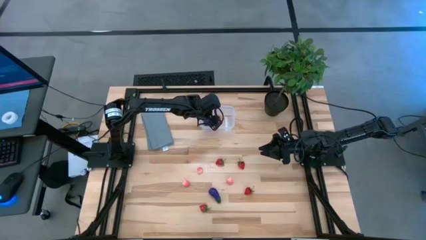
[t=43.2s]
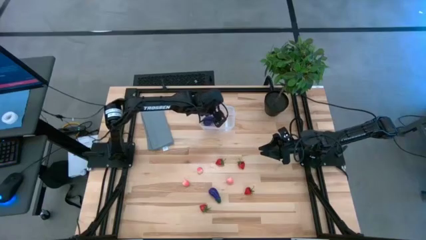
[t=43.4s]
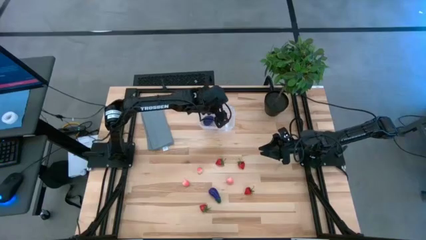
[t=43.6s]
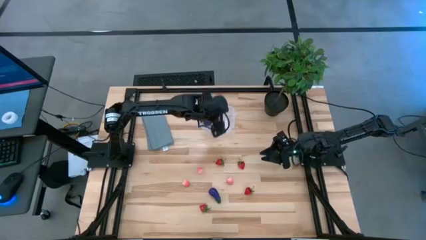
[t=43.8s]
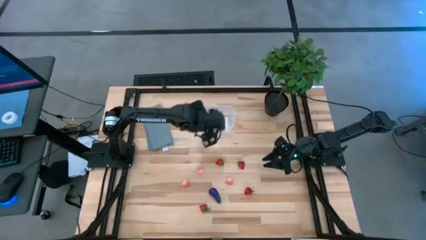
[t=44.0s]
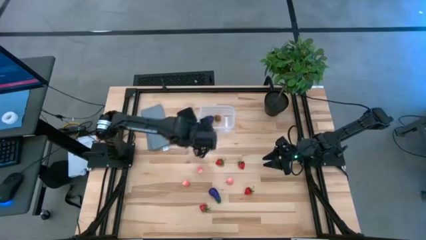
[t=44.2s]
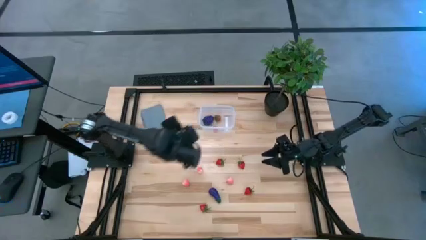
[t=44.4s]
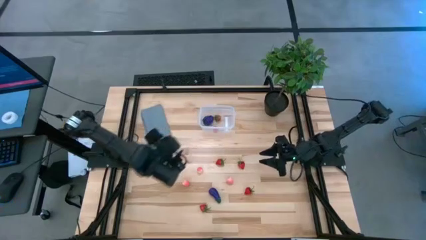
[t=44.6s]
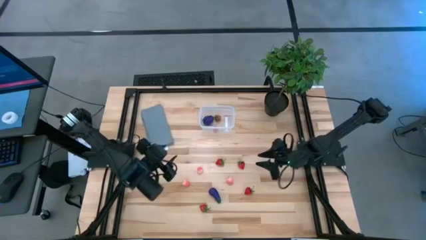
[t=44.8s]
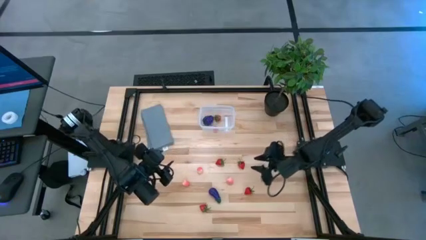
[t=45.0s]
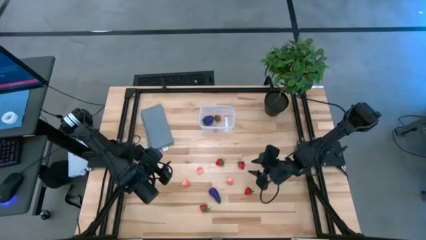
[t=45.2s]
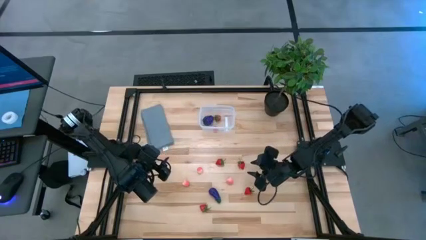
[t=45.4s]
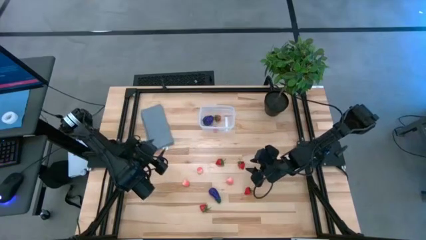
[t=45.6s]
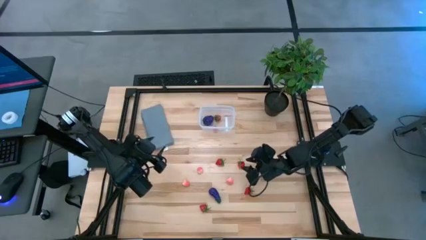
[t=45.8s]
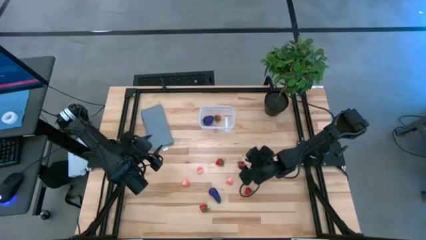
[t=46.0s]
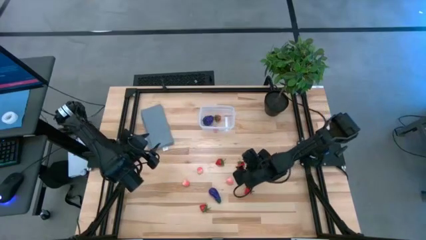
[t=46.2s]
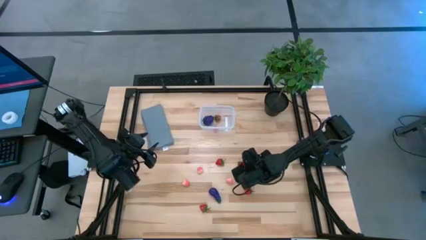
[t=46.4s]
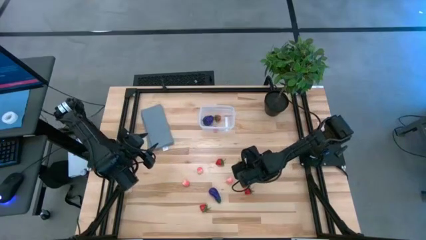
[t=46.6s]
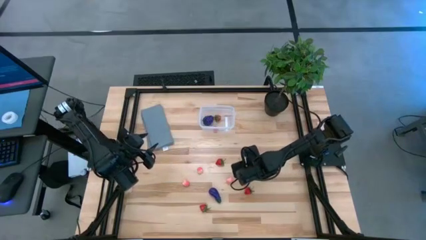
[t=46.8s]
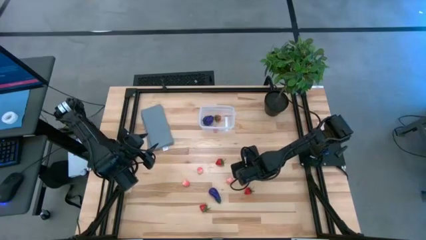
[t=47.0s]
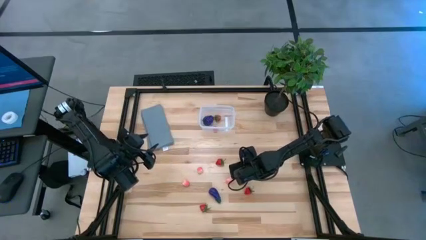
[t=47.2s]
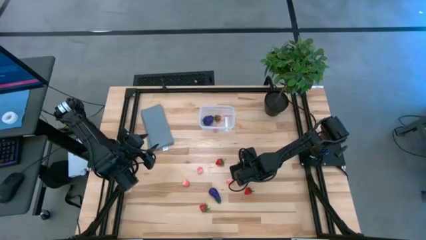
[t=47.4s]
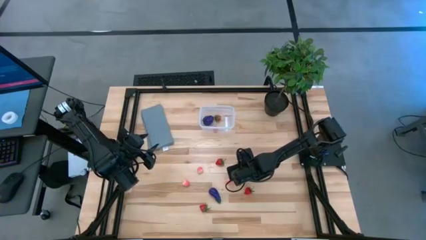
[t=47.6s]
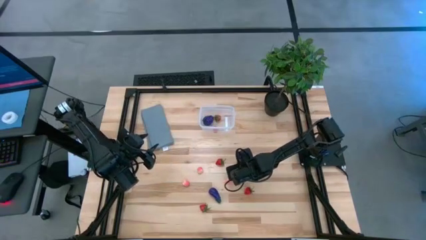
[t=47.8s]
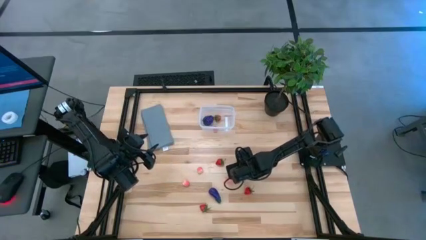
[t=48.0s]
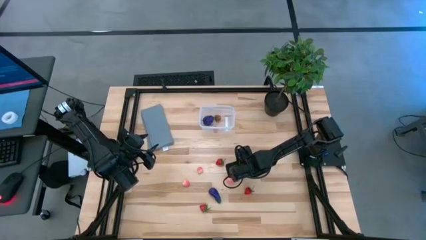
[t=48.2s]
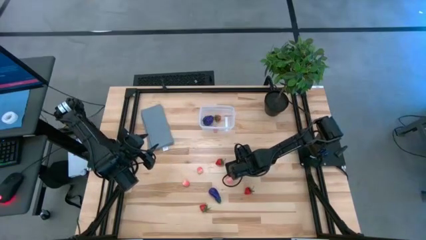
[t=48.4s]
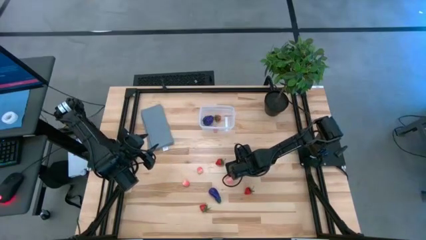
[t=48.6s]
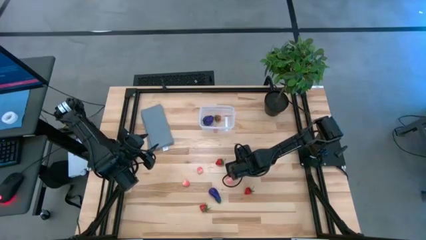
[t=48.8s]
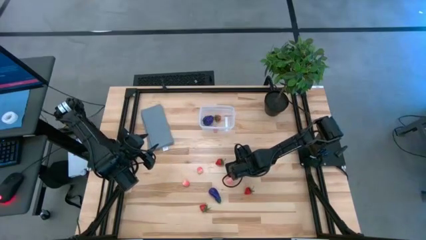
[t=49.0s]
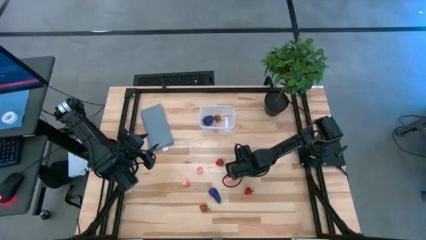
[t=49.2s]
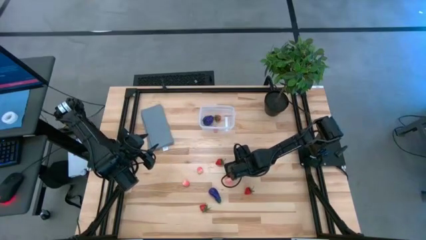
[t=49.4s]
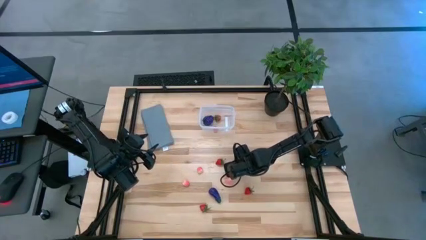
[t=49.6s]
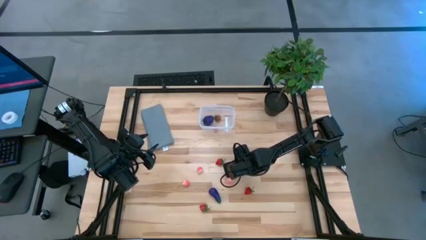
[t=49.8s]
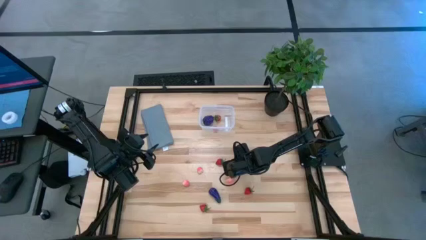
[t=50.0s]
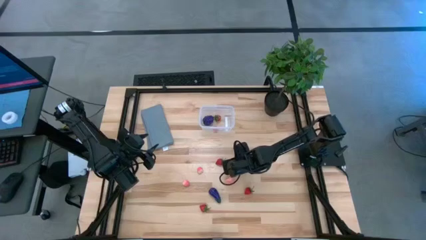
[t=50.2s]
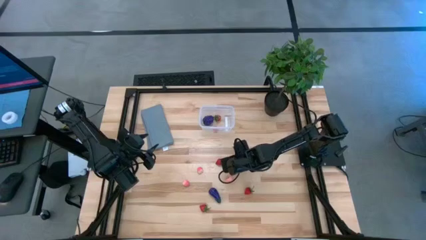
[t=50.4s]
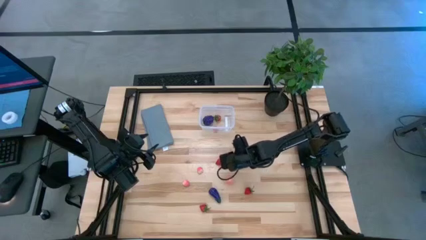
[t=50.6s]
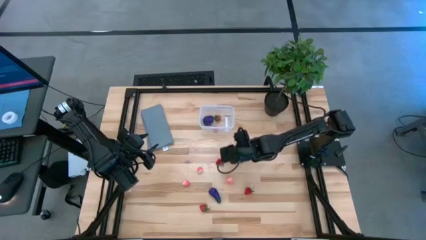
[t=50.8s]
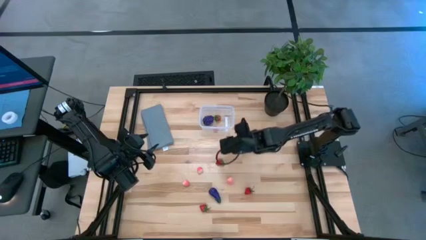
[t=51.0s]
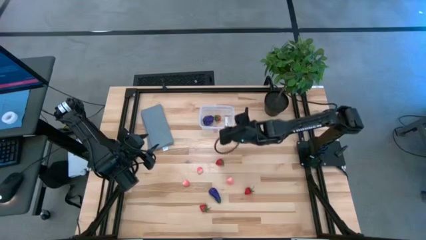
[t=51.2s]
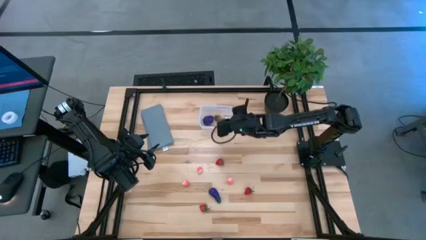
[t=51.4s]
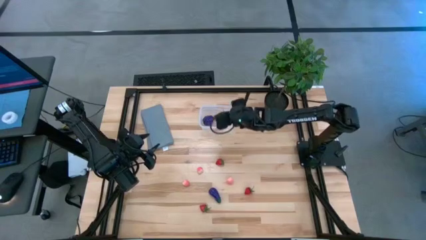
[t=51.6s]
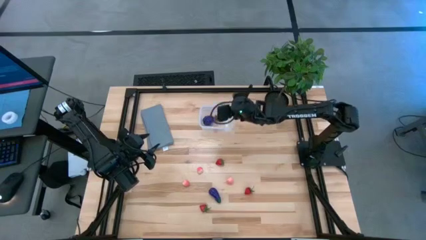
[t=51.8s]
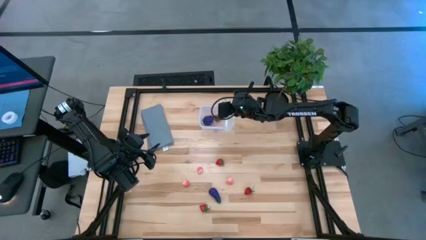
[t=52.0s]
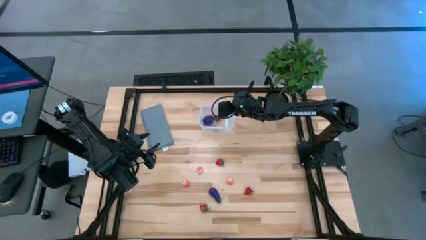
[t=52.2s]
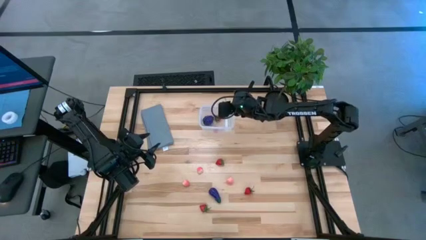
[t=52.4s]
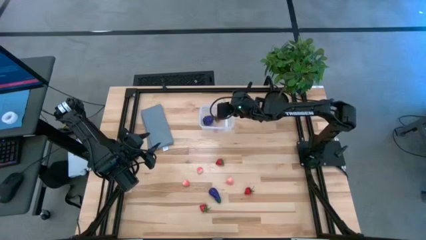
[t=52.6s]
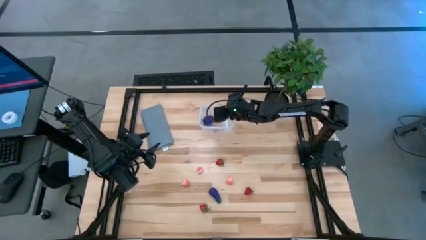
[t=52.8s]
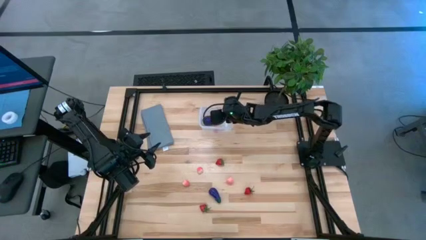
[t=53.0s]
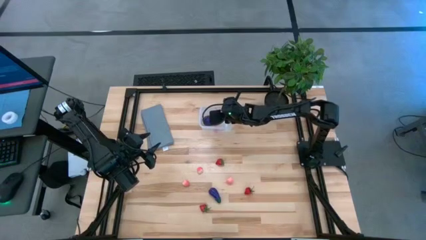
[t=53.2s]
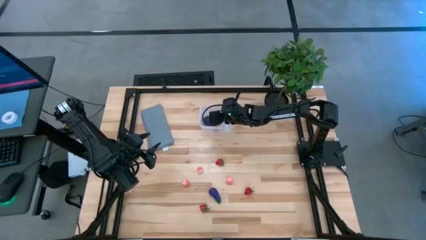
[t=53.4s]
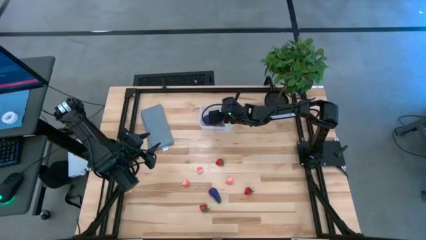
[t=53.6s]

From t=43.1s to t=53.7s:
Task: Pick and placing Produce into tupperware
Put the strawberry into the transparent bin

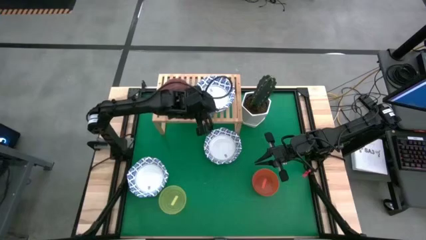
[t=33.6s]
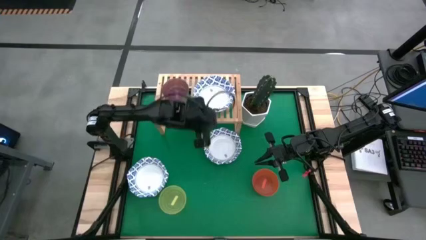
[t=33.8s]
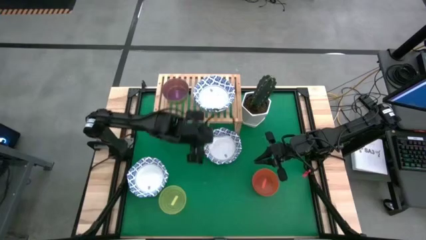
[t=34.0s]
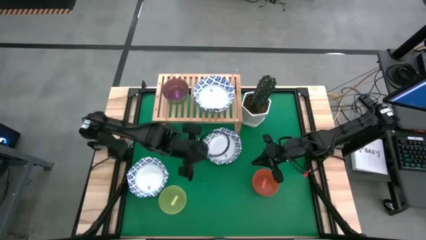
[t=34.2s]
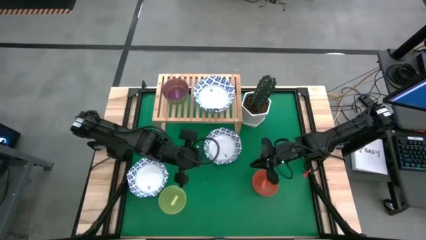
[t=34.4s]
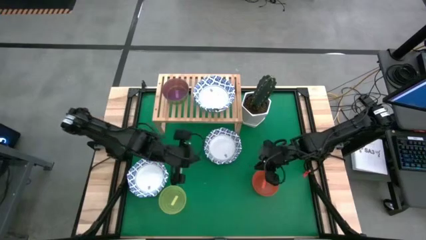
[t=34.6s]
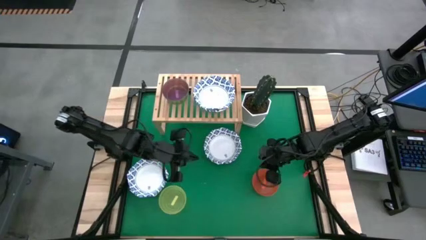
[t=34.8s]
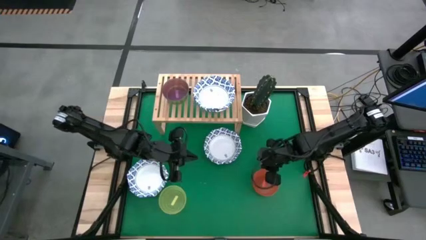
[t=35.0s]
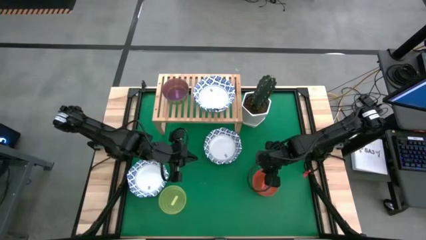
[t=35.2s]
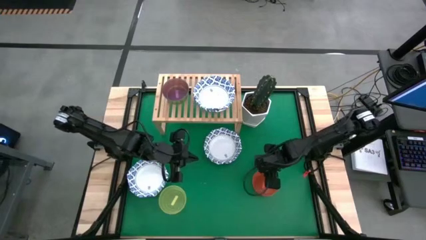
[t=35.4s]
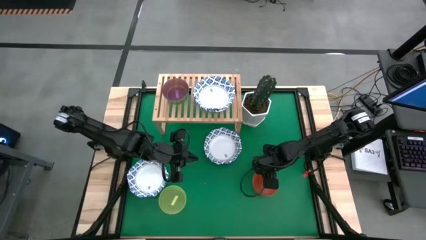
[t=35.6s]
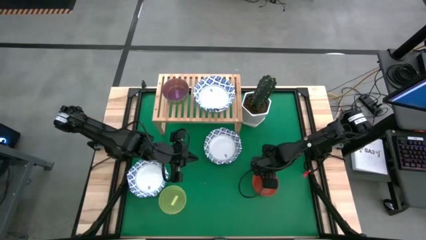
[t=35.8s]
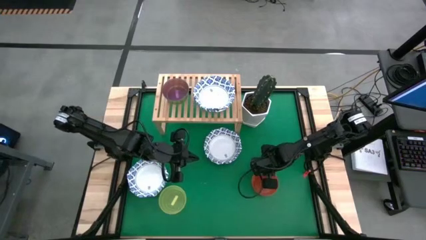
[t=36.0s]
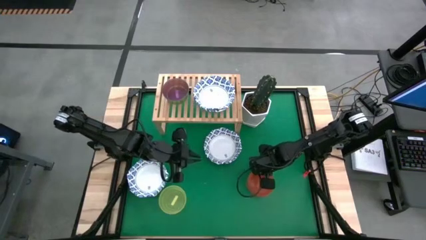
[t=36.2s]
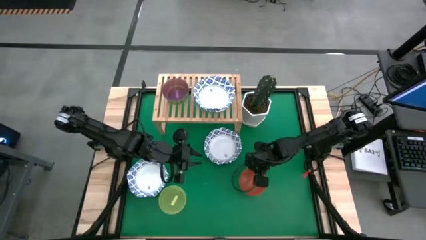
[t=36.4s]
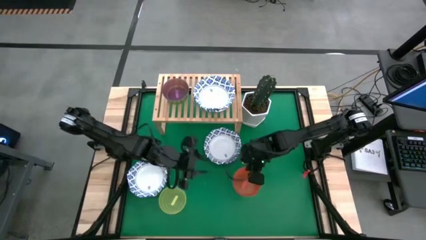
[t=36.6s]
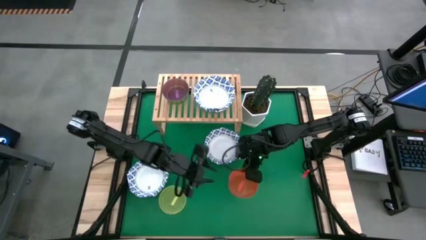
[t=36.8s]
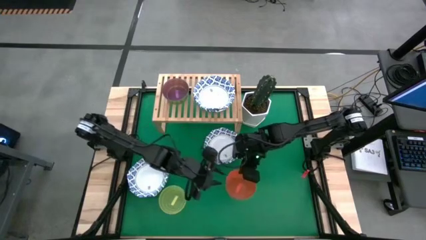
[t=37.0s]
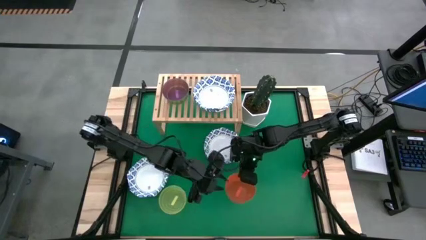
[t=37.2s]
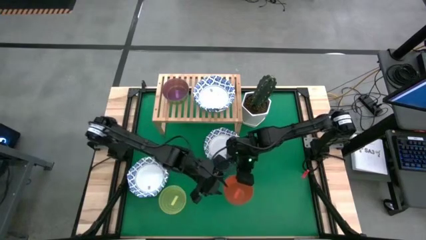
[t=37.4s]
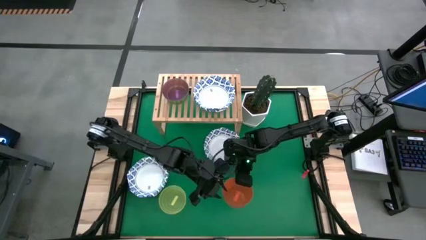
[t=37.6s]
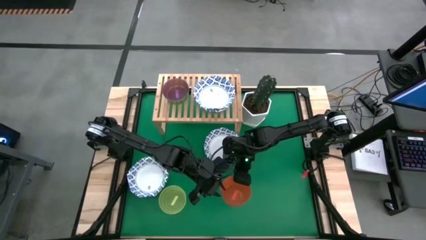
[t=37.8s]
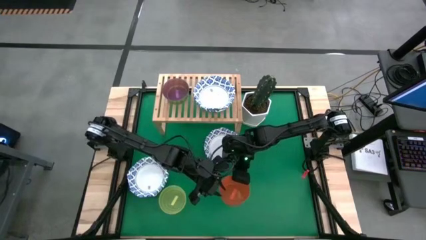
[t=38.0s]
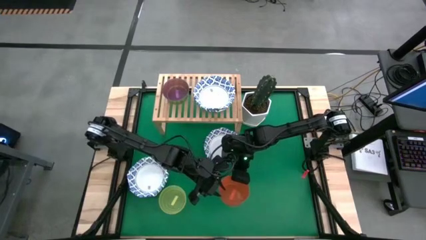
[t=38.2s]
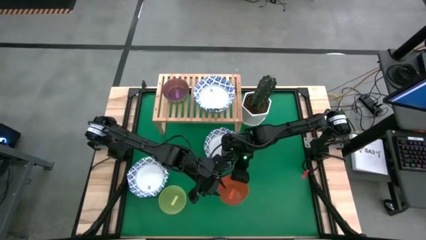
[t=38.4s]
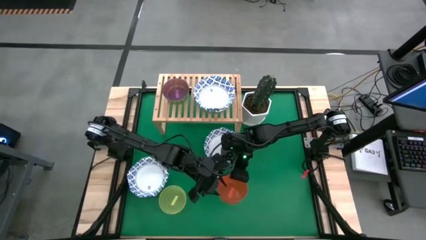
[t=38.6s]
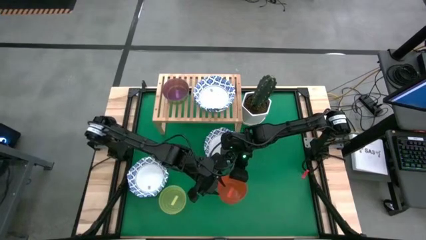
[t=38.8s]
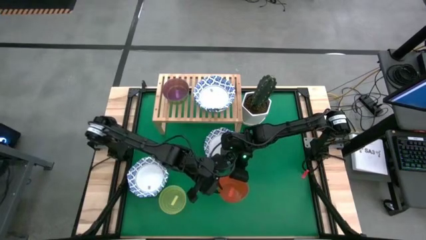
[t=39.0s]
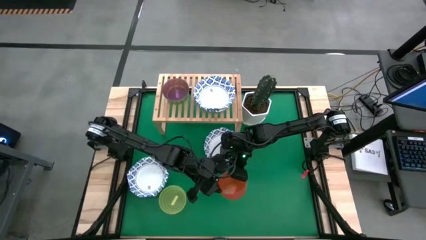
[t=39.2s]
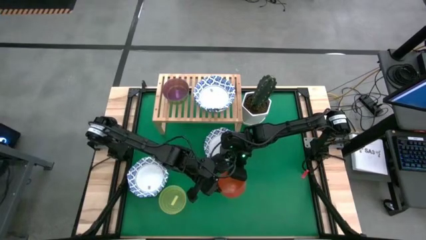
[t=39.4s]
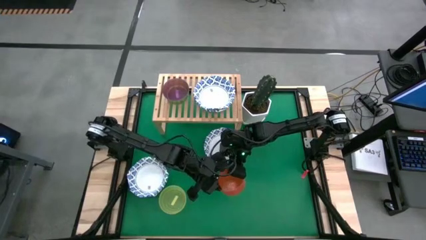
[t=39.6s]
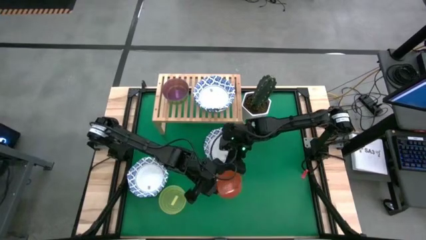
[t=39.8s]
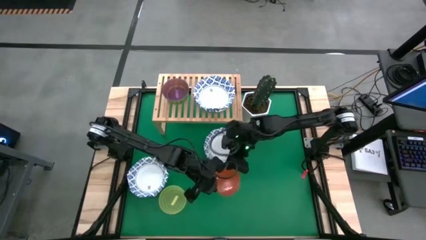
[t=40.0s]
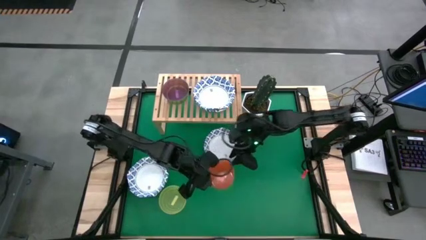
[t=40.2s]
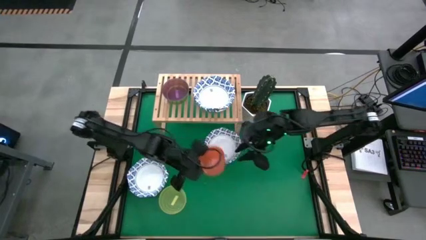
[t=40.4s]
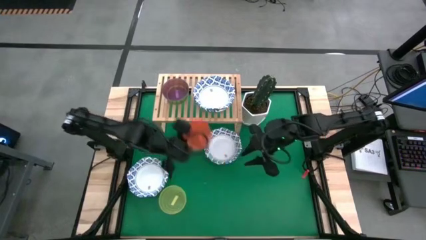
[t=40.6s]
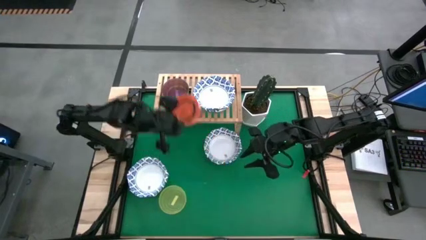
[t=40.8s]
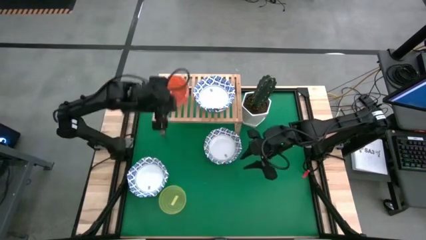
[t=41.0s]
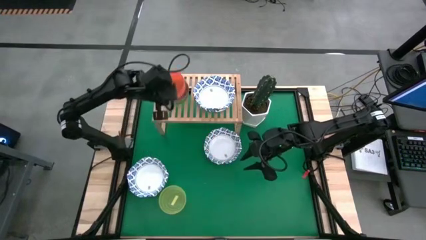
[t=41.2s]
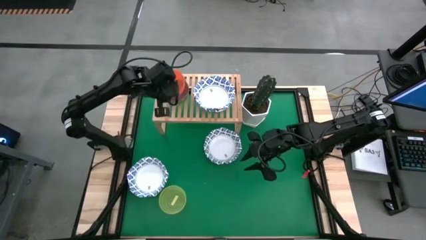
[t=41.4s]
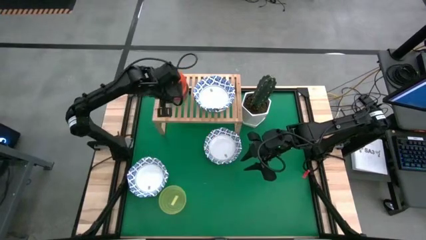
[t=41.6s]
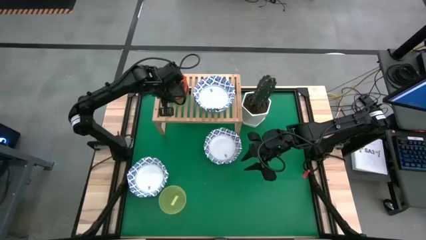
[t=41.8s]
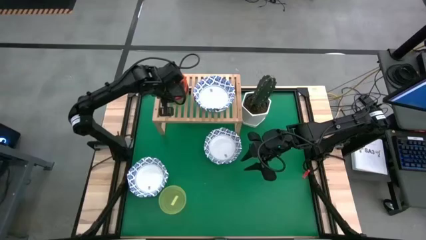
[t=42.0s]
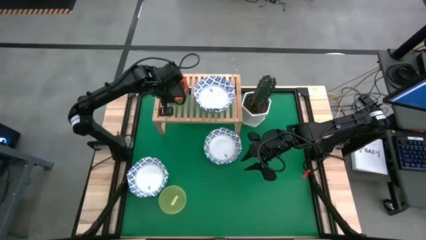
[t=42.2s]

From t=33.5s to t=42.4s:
Task: Place and stack bowls onto a shelf
Stack the orange bowl on top of the purple bowl on the shelf
